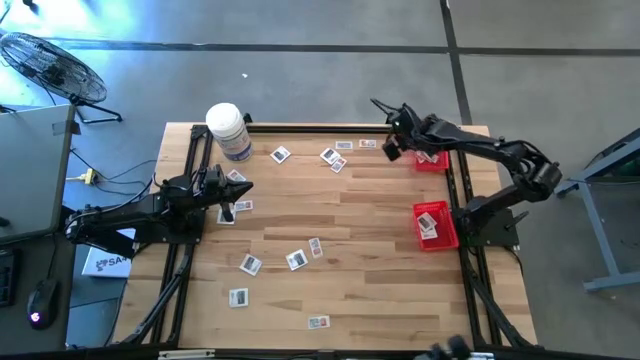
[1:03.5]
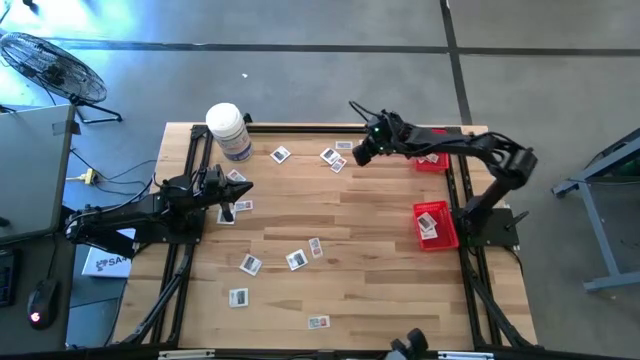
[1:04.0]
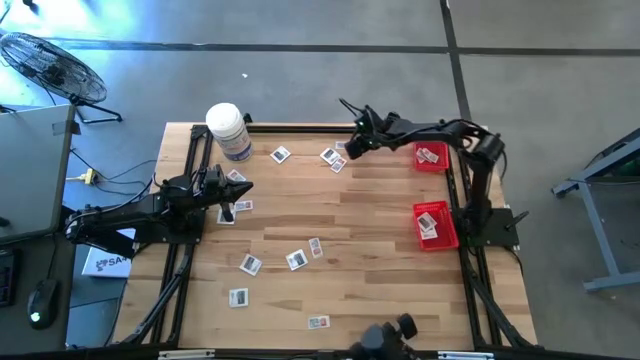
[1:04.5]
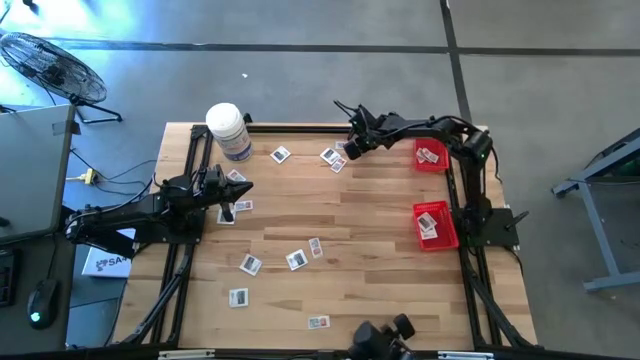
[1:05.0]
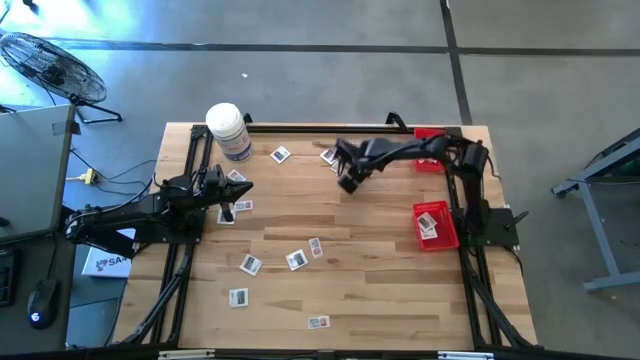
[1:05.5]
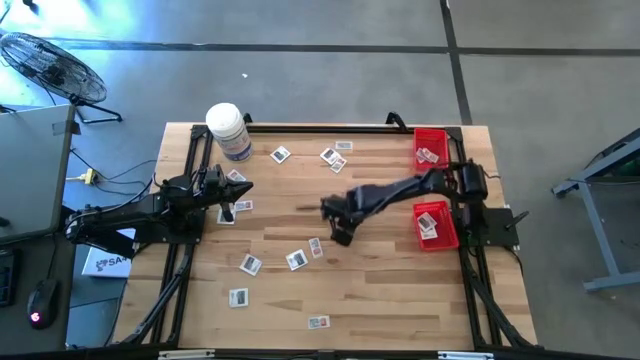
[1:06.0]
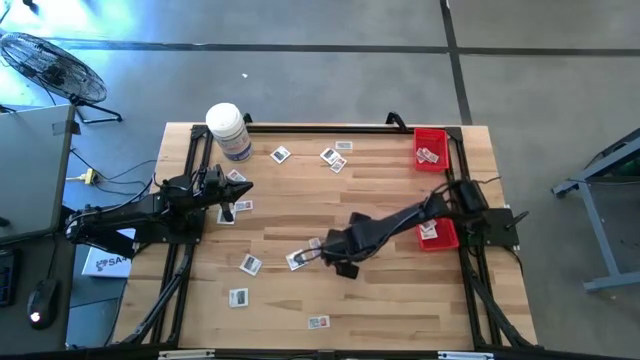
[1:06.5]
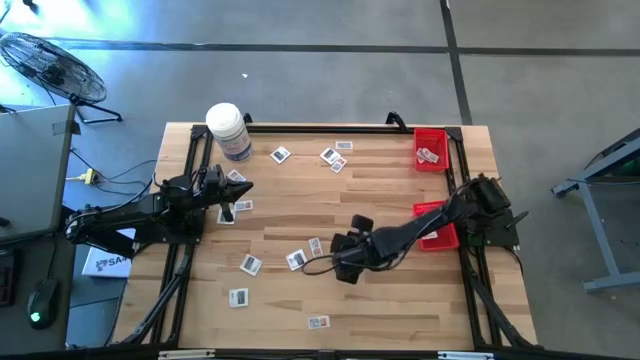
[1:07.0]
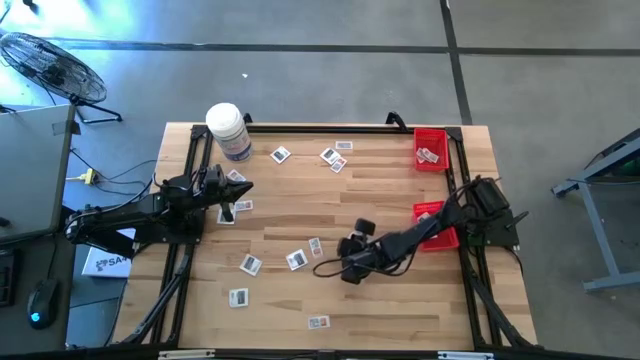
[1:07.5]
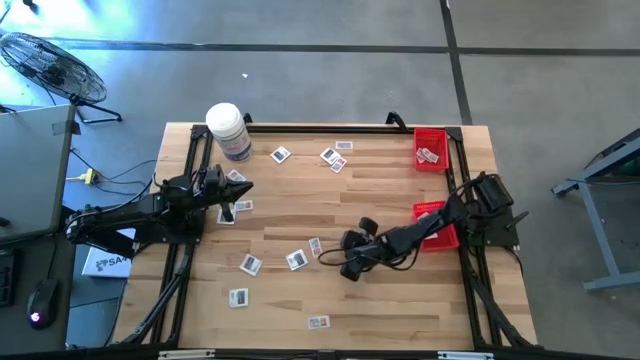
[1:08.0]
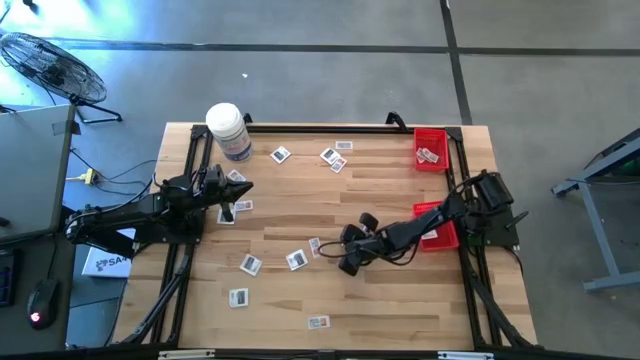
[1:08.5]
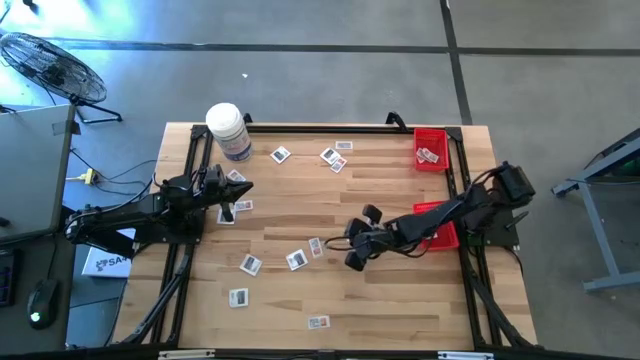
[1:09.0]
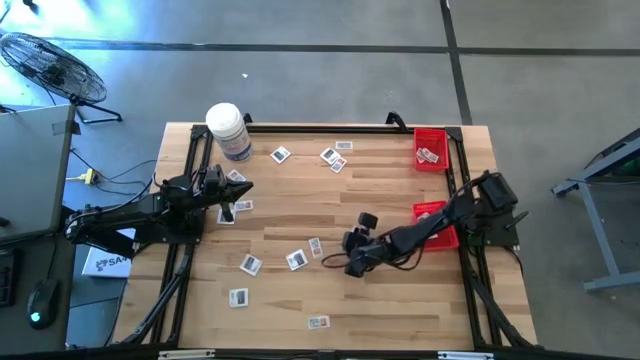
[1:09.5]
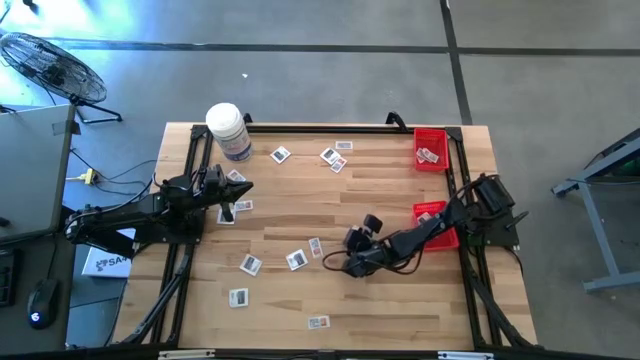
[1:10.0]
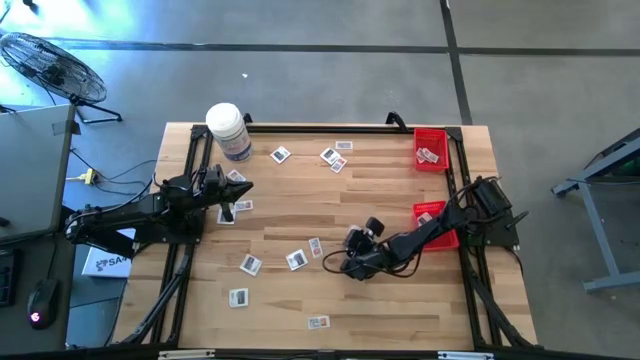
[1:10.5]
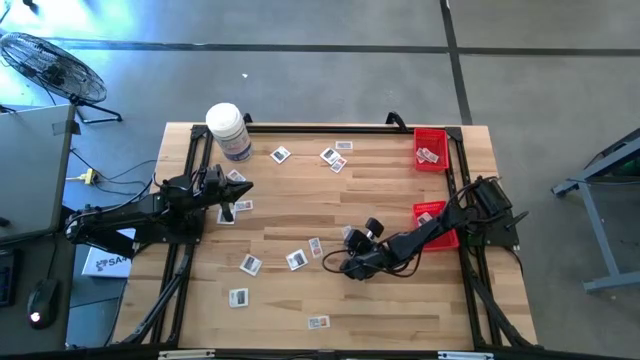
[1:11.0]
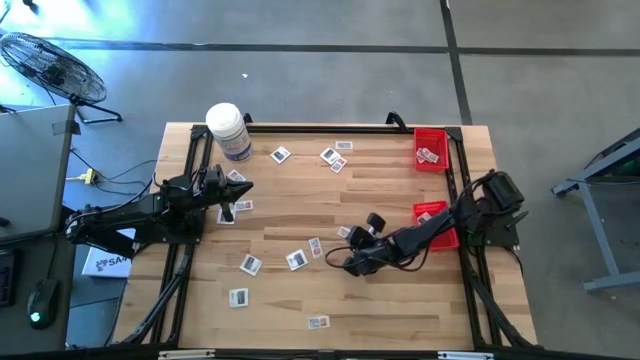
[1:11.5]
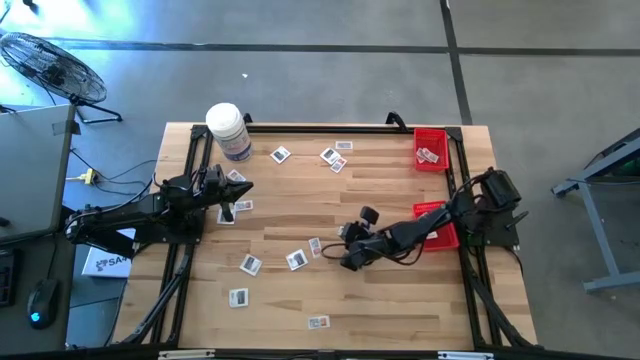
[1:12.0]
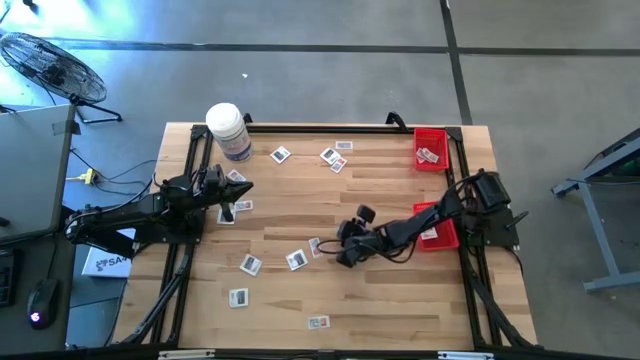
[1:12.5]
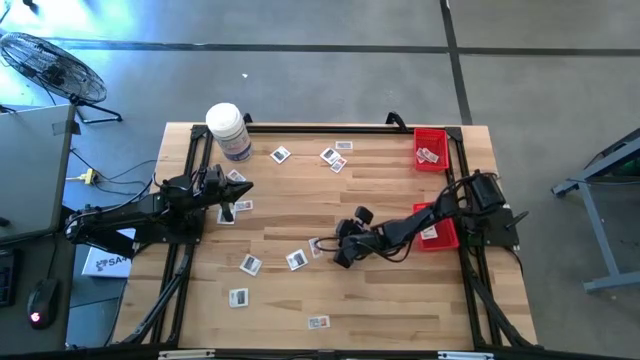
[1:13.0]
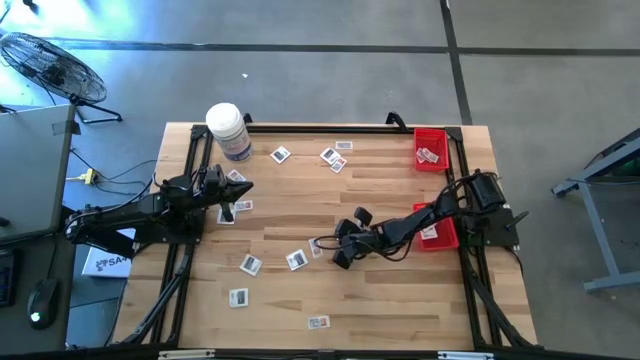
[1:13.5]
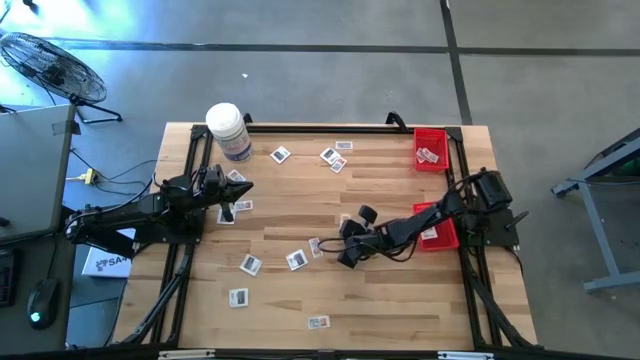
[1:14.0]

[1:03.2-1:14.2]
Task: Pick & Place First Aid Supplies
Put the ointment pack into the top basket

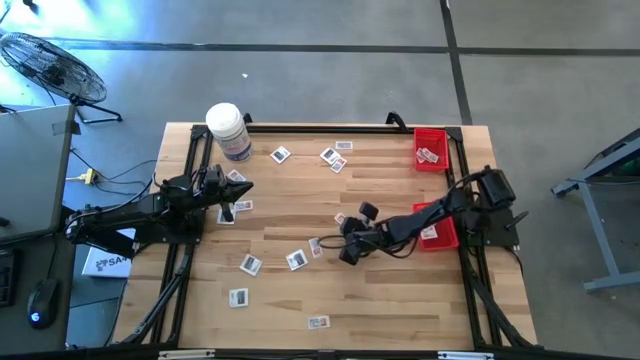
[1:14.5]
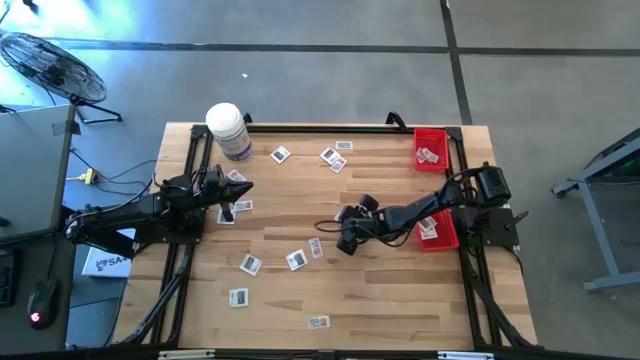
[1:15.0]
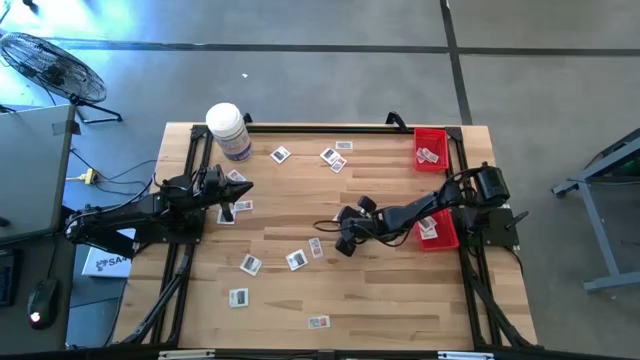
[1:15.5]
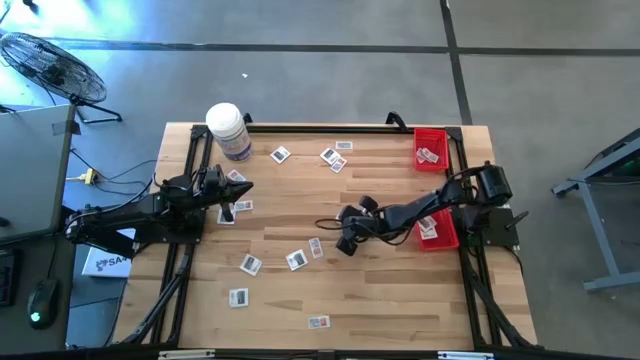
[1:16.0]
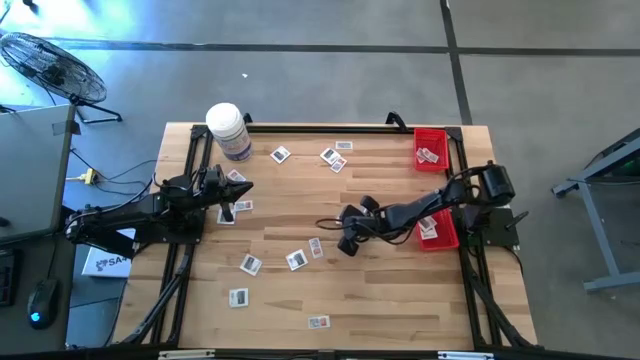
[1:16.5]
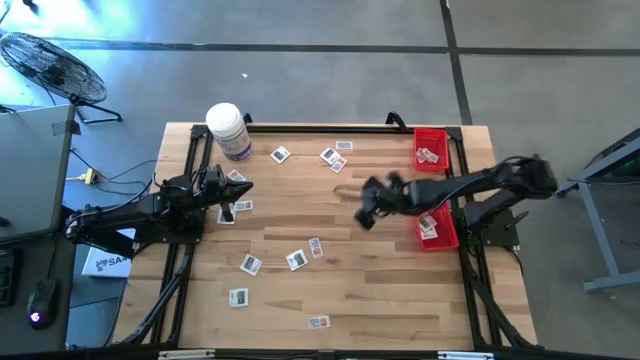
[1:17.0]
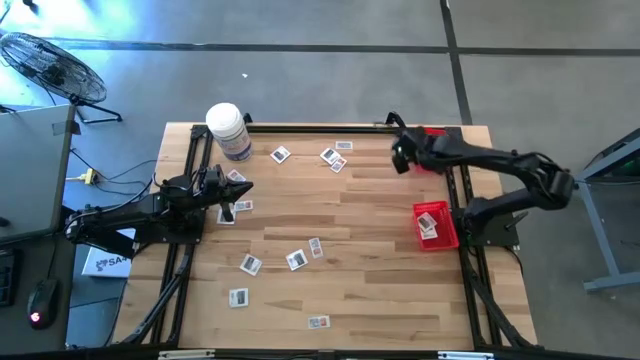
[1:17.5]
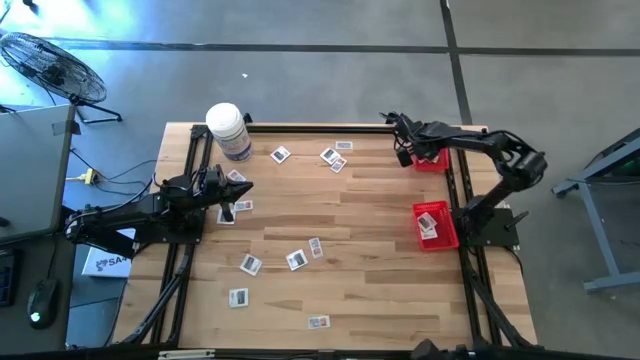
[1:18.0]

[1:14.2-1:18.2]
Put the ointment pack into the top basket

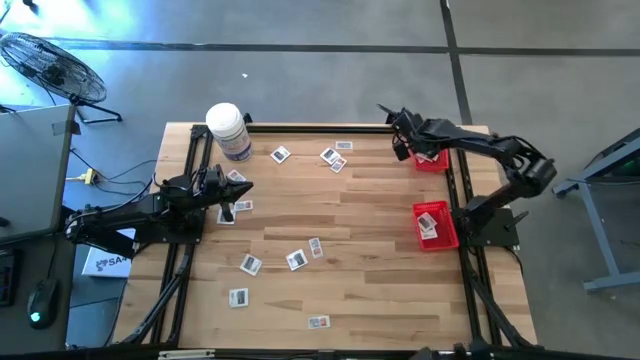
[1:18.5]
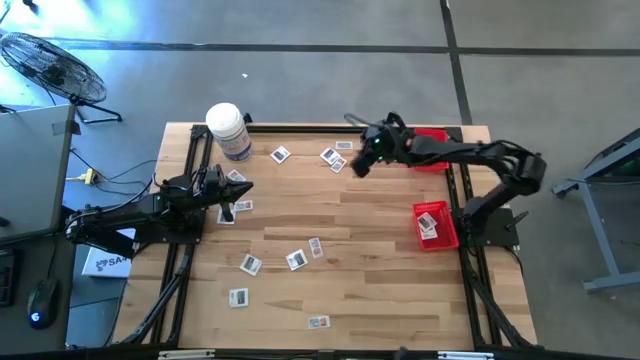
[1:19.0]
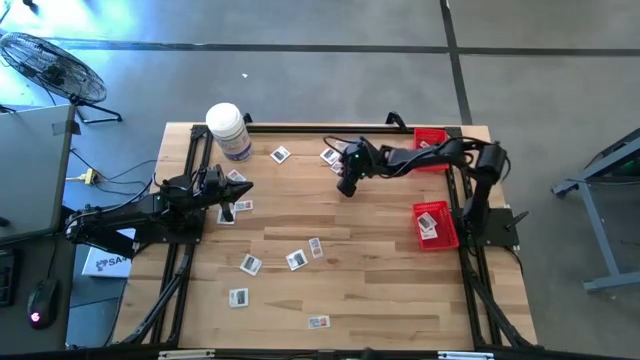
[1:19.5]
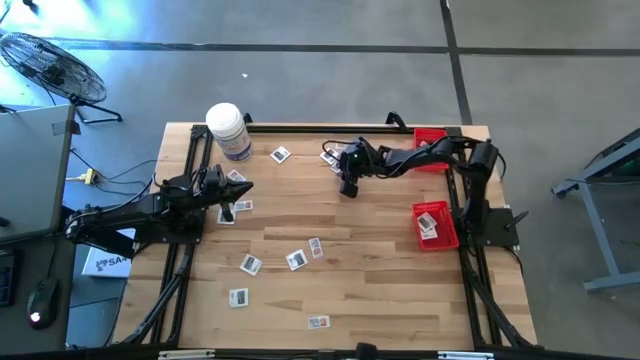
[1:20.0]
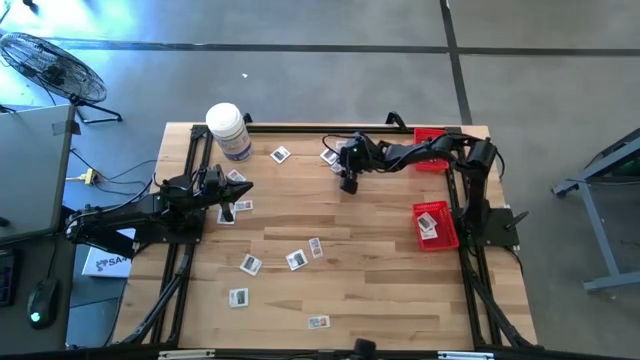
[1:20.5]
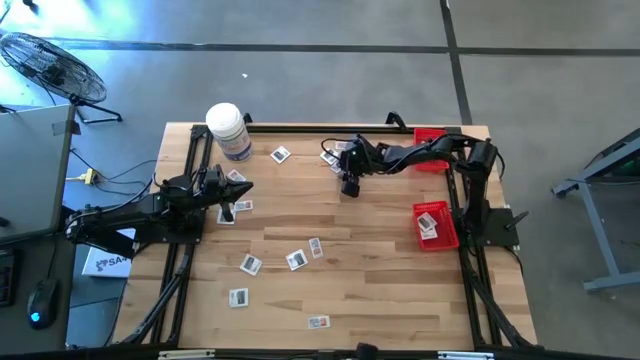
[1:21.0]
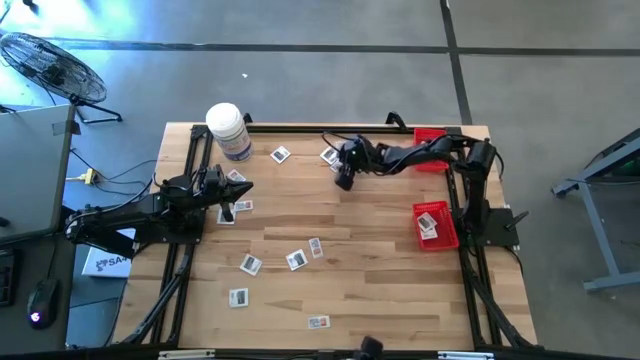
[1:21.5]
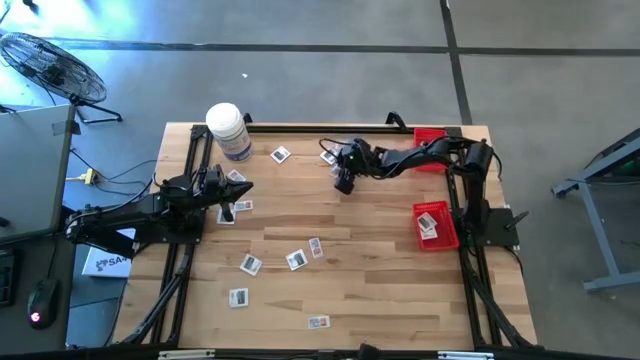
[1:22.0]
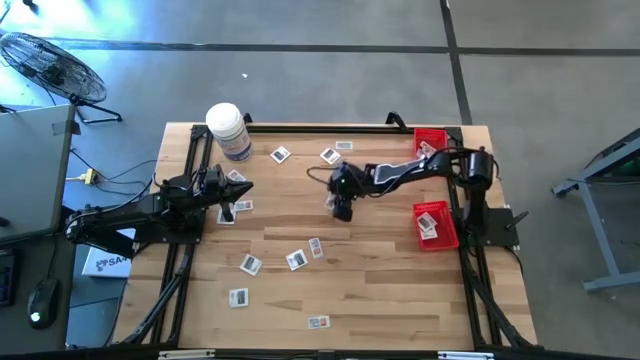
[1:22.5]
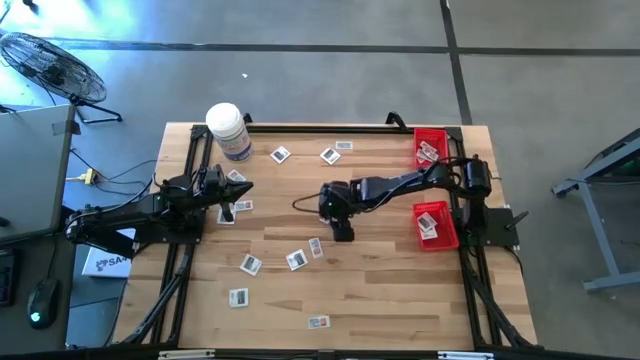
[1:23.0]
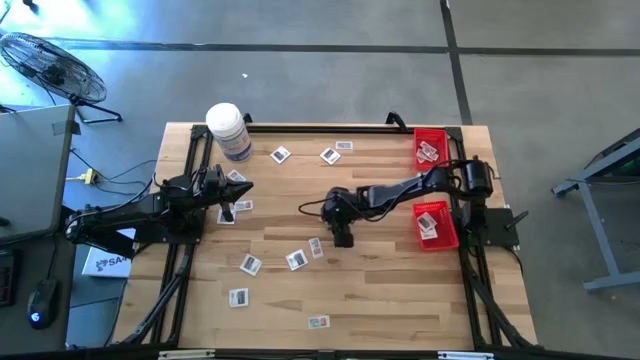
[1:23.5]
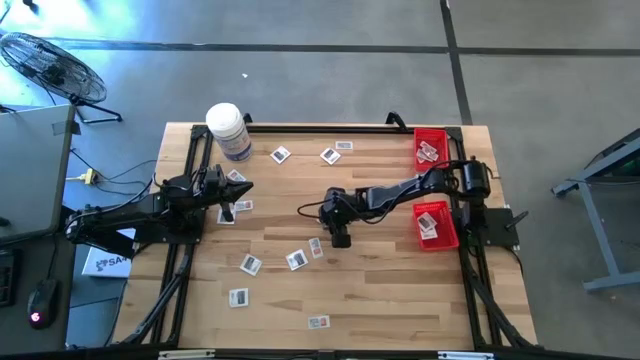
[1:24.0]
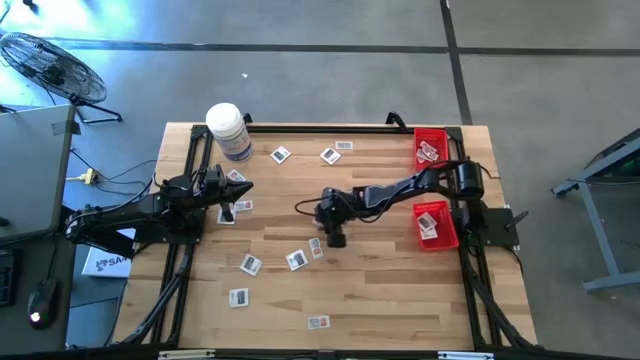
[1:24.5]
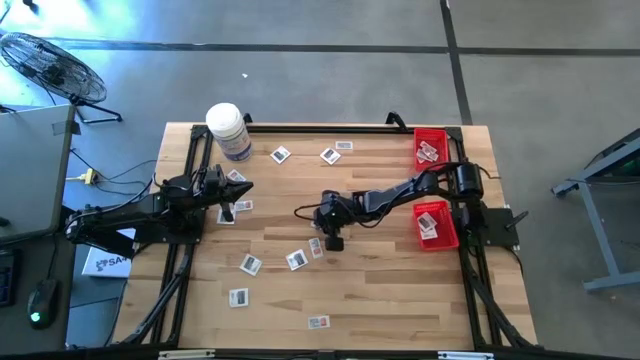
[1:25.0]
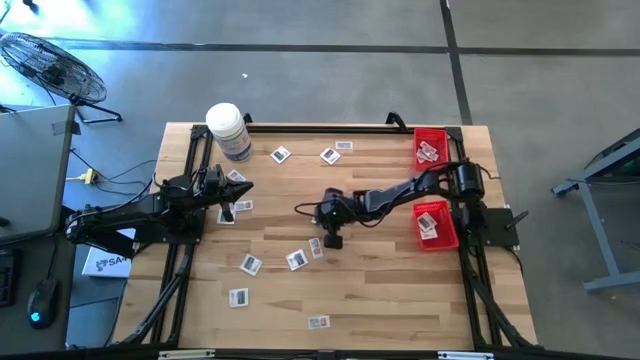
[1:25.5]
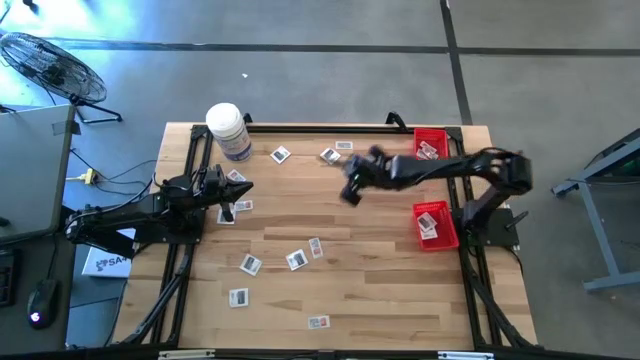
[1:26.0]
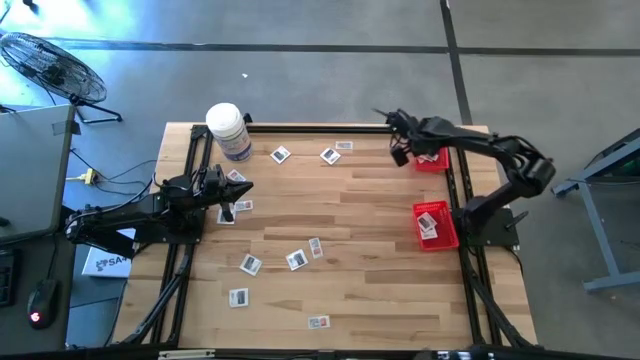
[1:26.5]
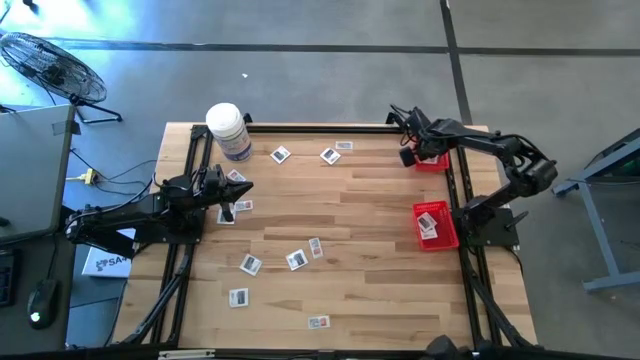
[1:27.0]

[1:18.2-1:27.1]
Put the ointment pack into the top basket
